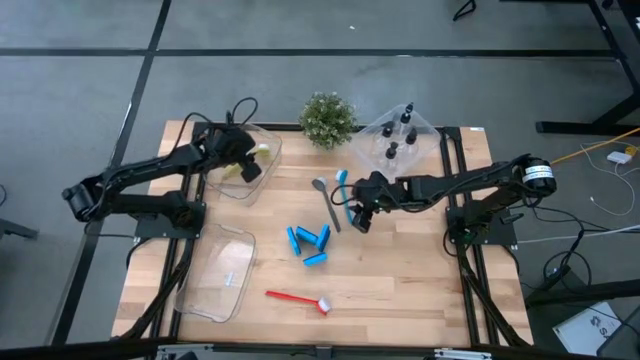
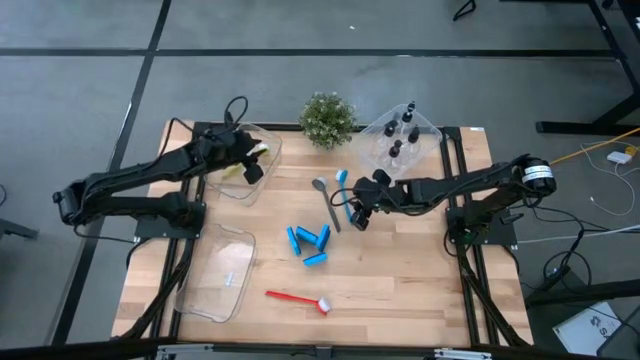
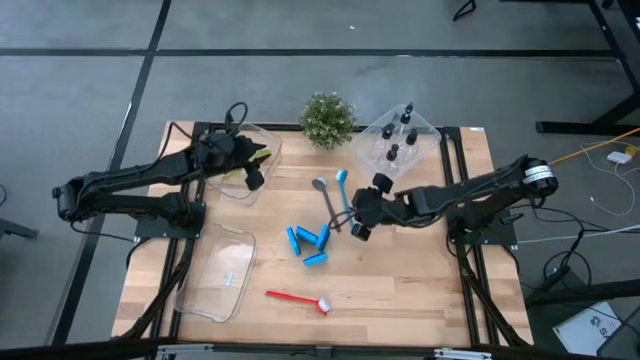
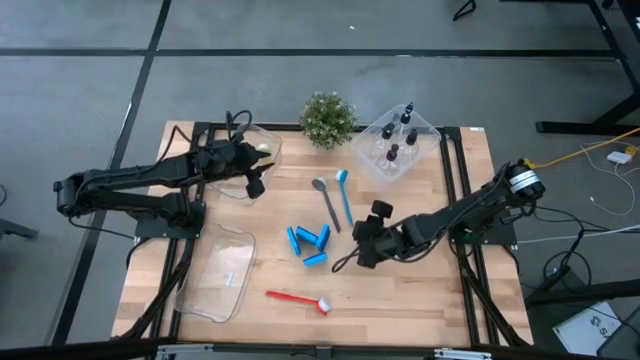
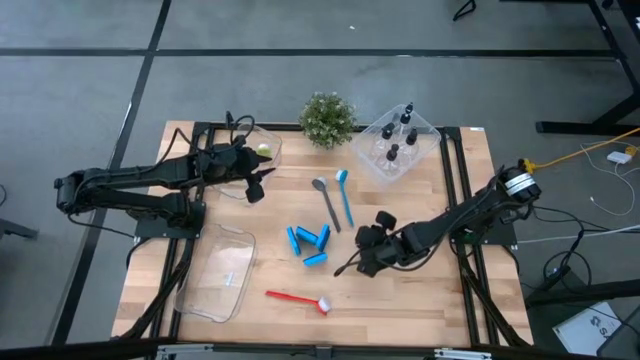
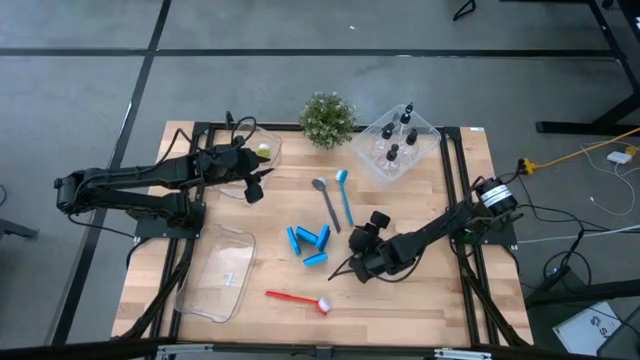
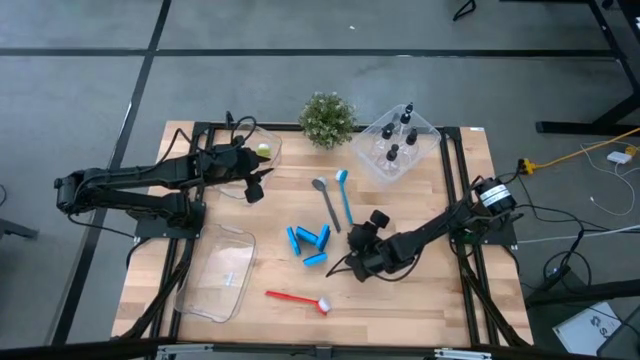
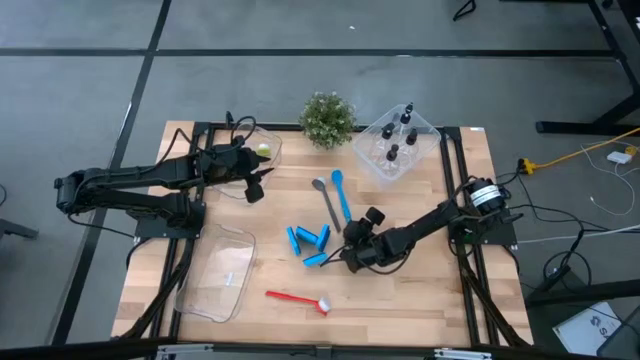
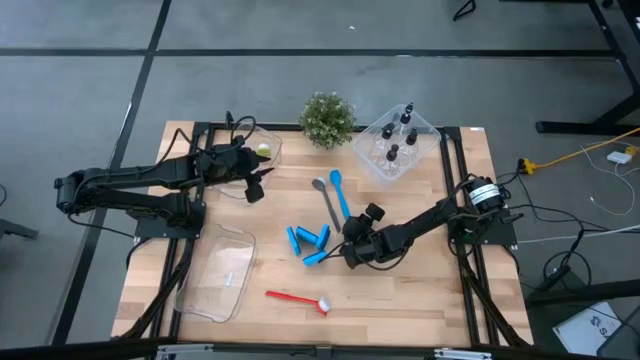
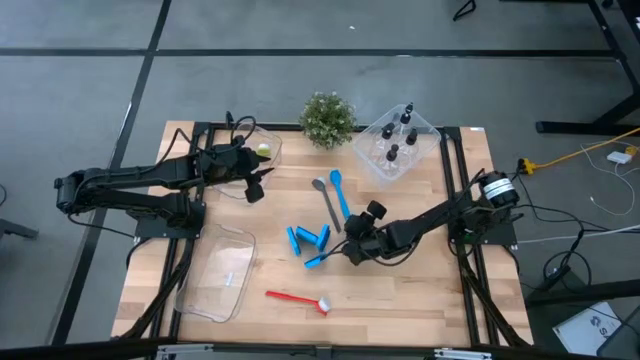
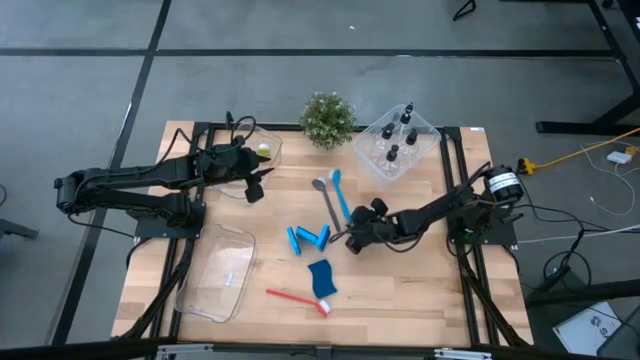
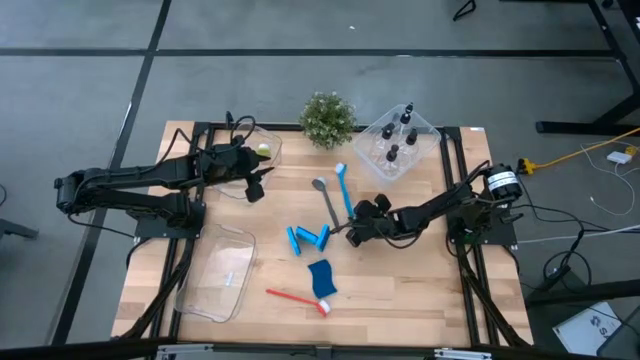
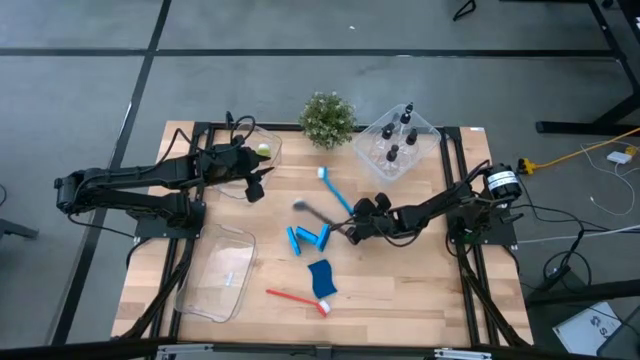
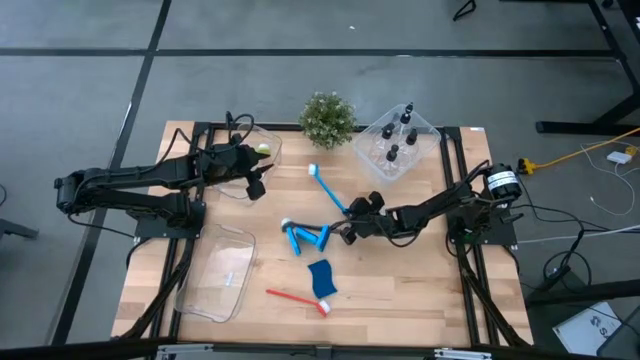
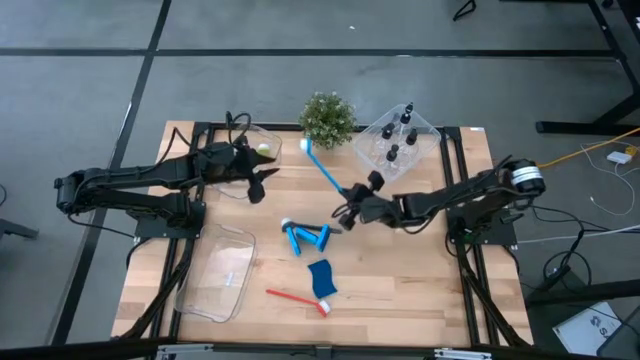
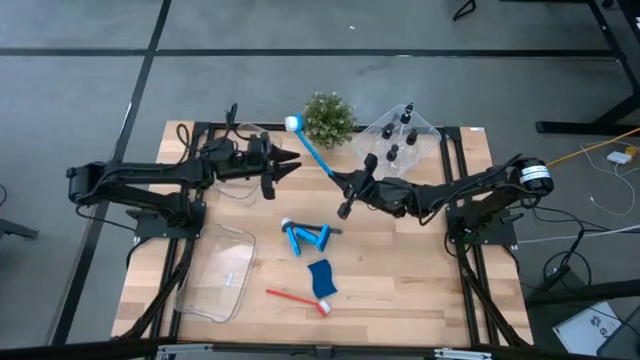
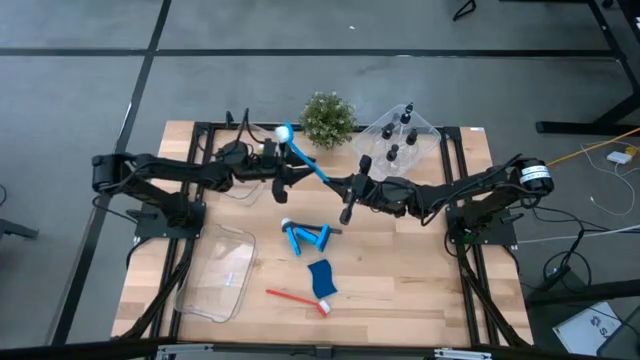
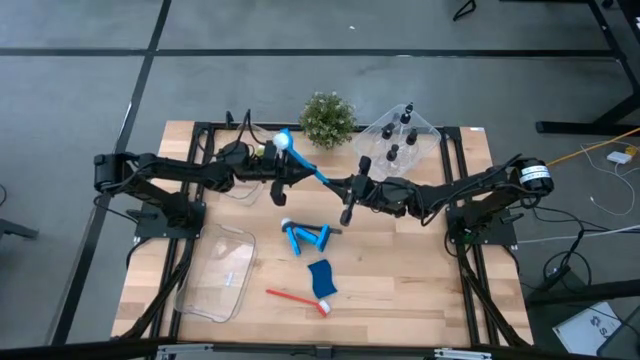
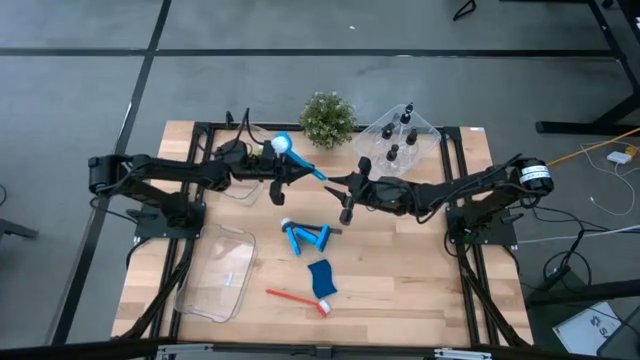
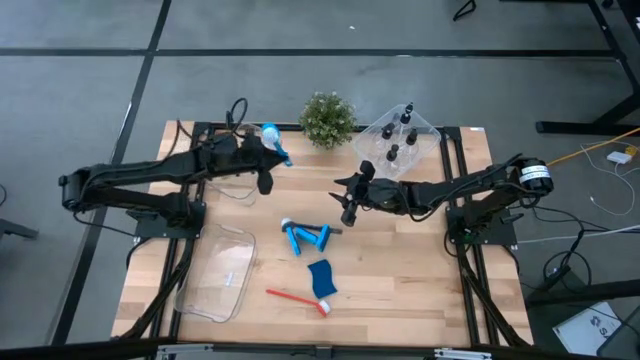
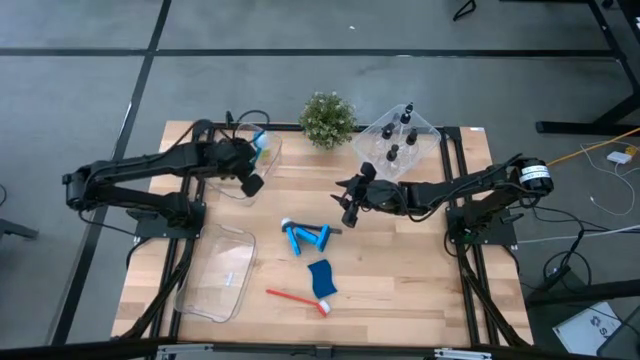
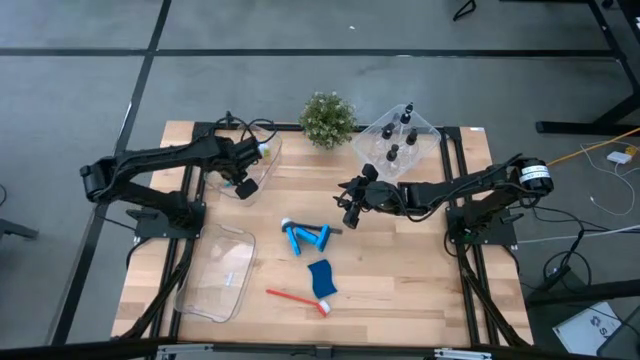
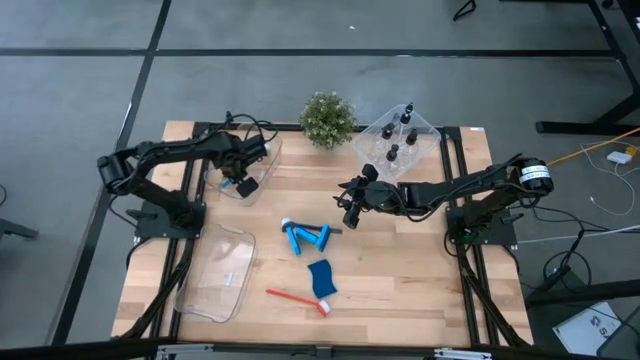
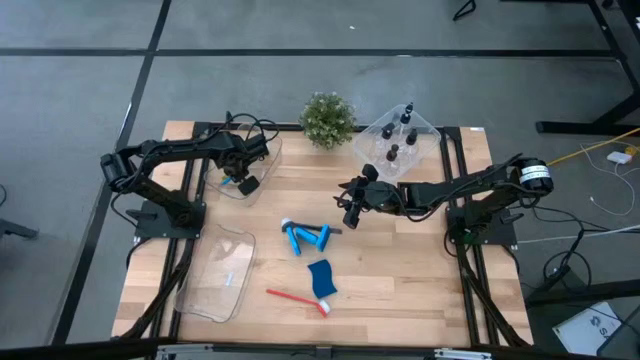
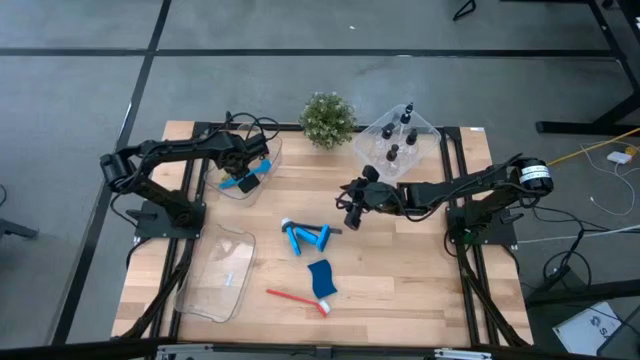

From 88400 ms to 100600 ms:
Task: Pick & Place Kitchen Sink Supplies
Put the blue dish brush into the top transparent bin

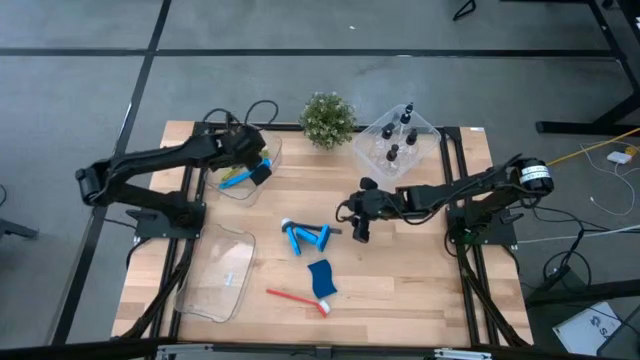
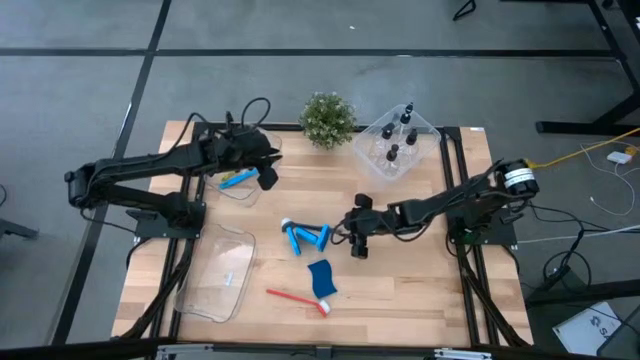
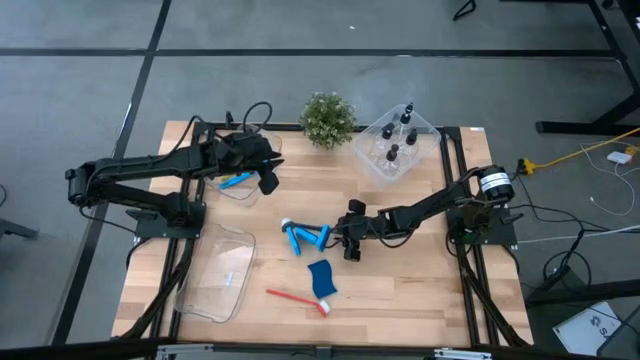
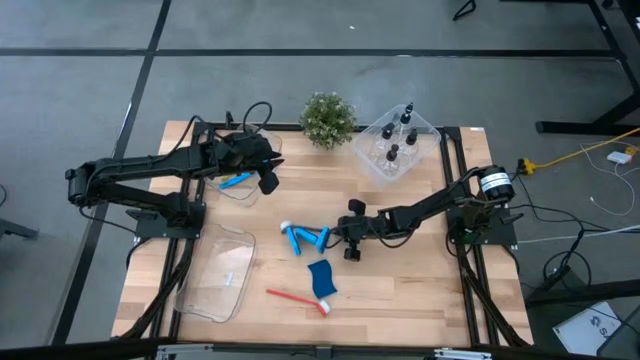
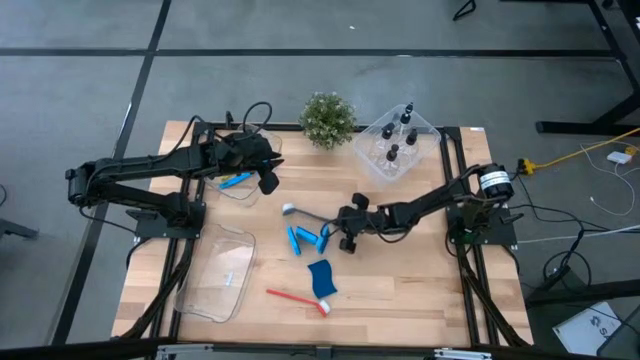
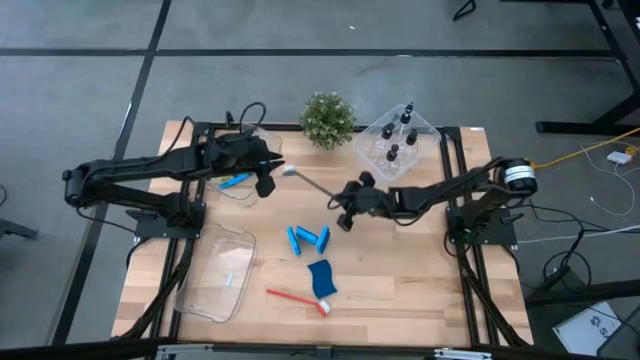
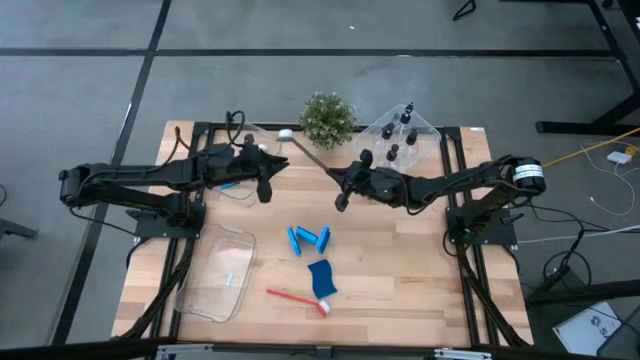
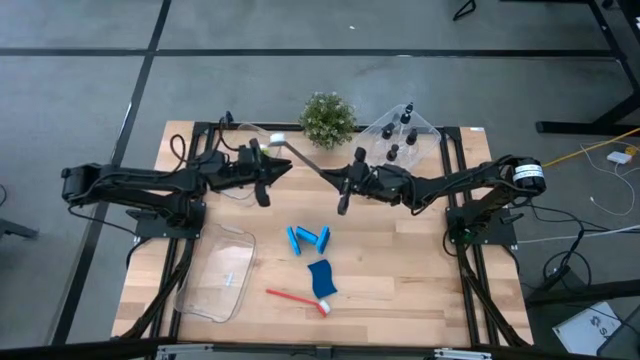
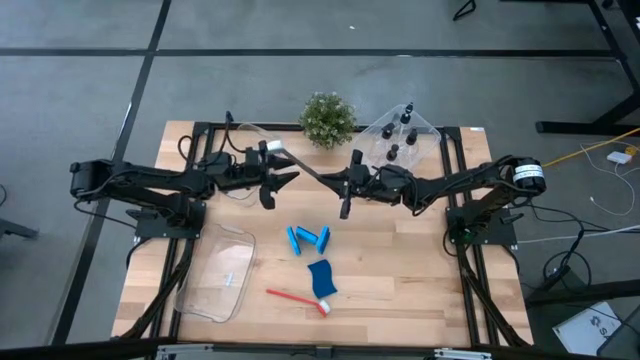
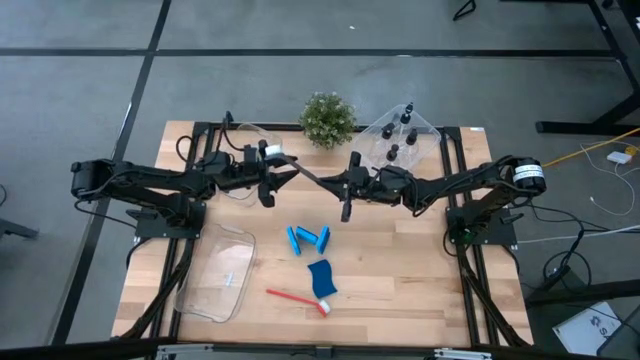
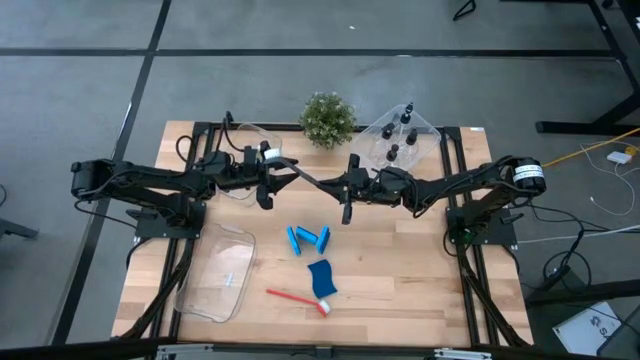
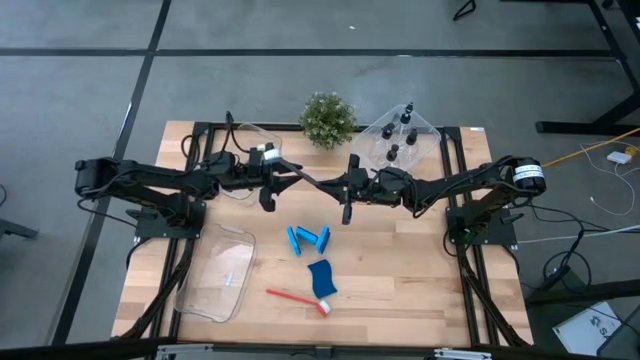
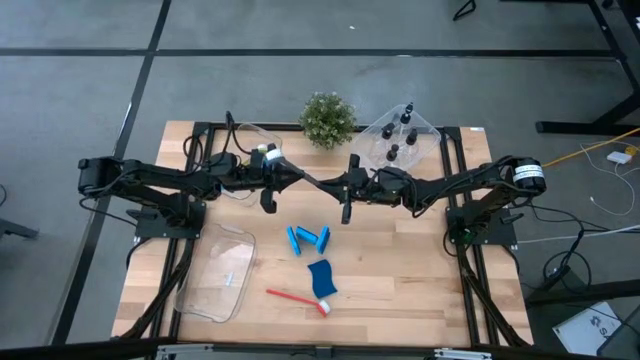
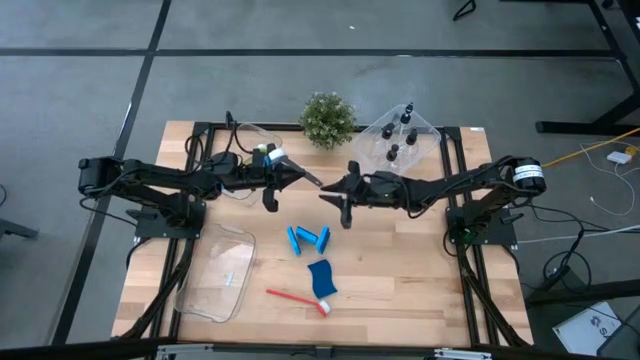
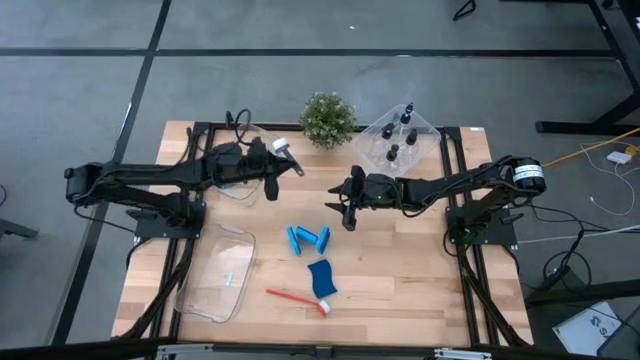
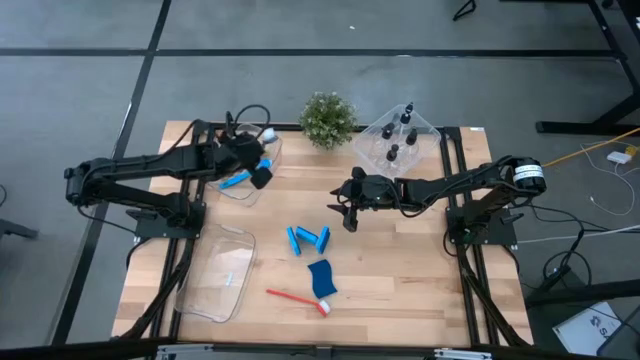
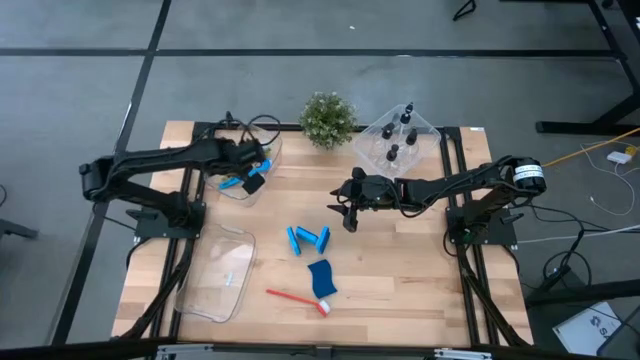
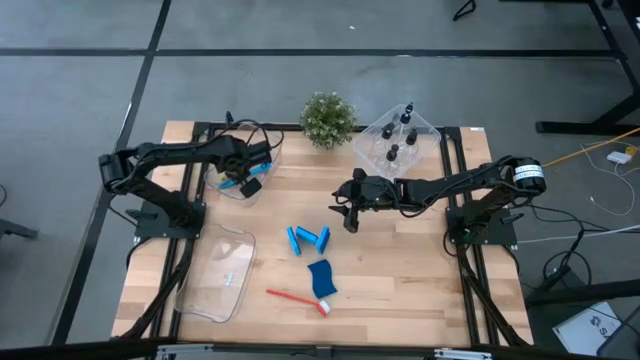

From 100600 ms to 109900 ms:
Put the black dish brush into the top transparent bin
